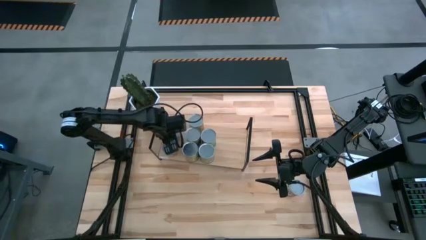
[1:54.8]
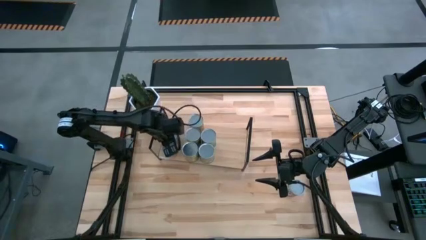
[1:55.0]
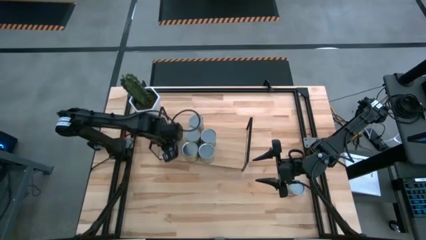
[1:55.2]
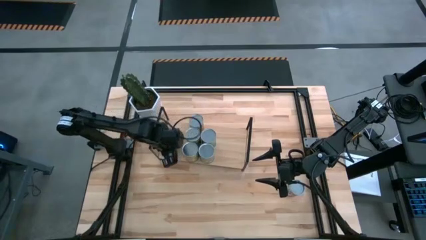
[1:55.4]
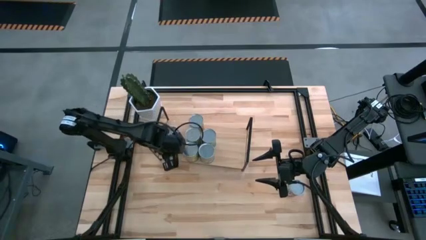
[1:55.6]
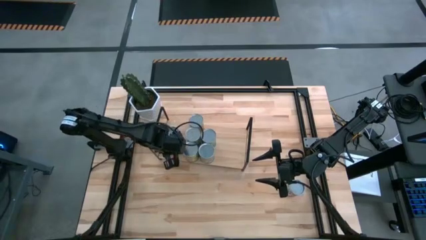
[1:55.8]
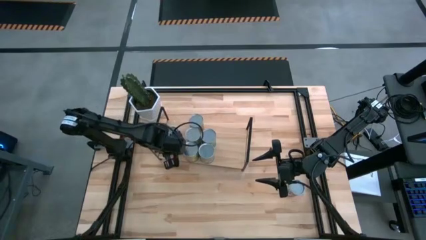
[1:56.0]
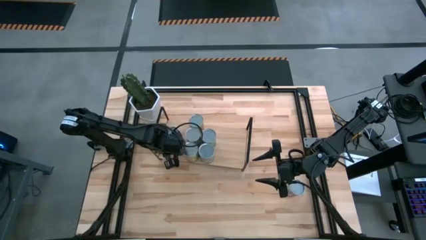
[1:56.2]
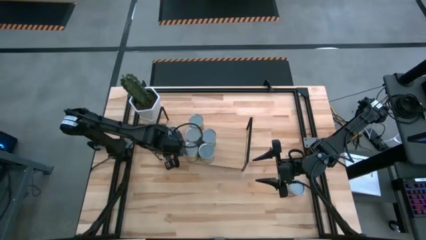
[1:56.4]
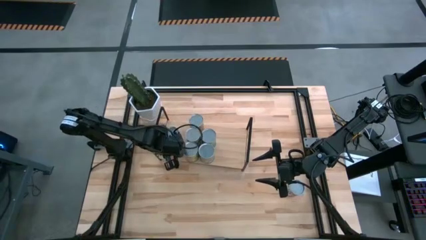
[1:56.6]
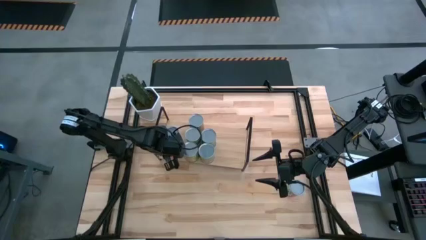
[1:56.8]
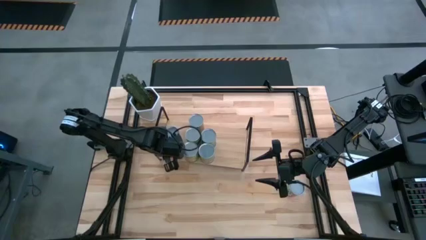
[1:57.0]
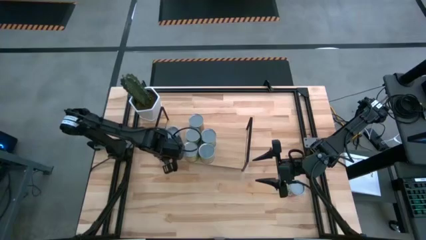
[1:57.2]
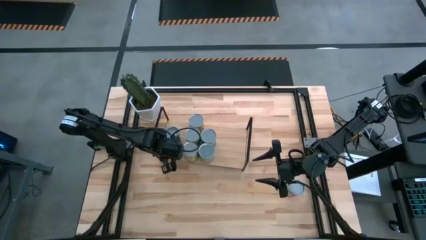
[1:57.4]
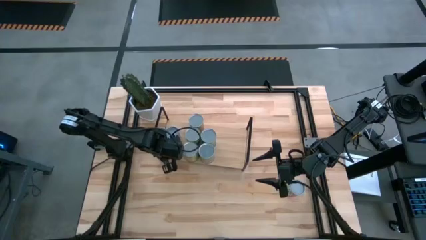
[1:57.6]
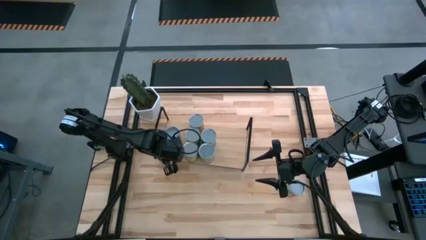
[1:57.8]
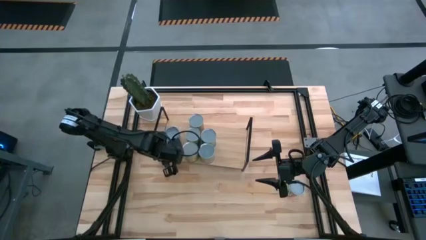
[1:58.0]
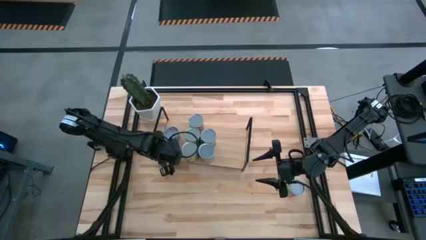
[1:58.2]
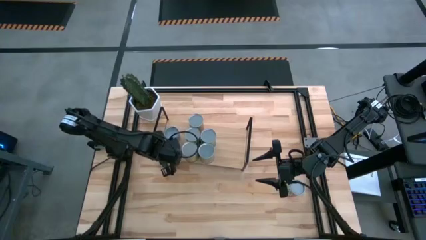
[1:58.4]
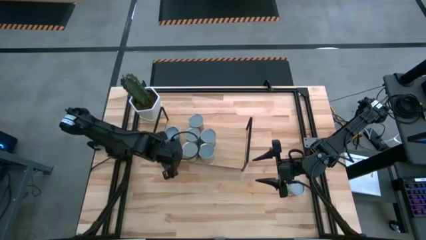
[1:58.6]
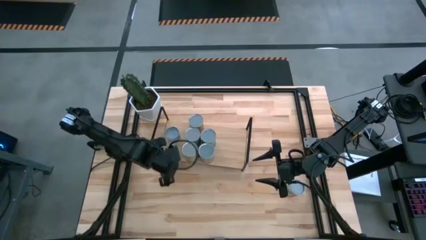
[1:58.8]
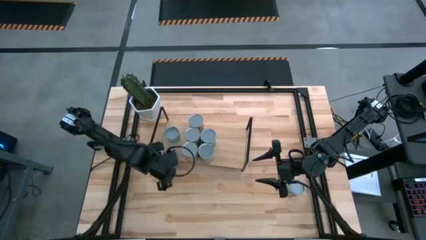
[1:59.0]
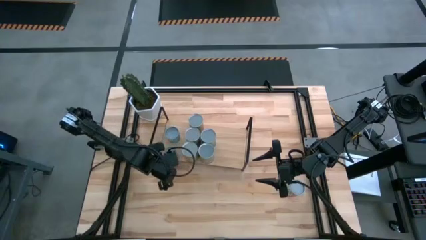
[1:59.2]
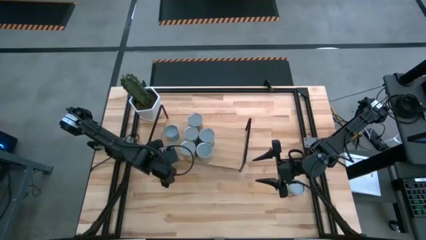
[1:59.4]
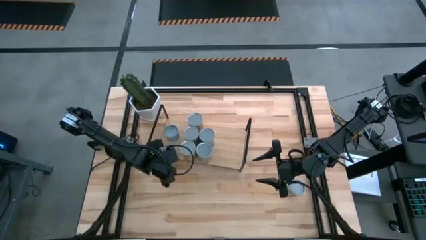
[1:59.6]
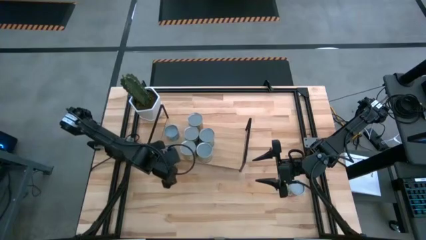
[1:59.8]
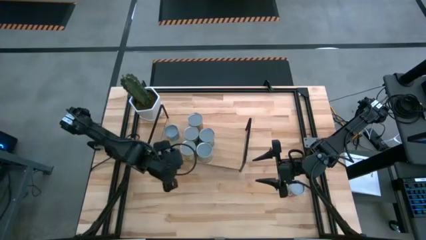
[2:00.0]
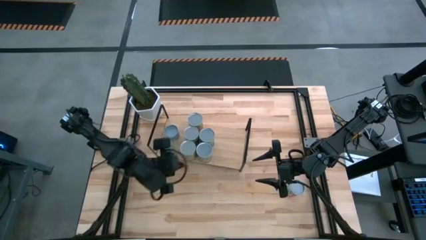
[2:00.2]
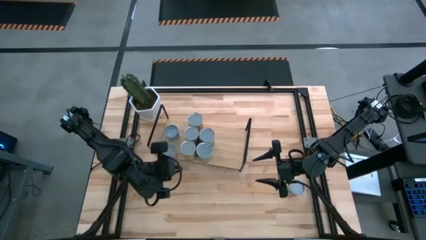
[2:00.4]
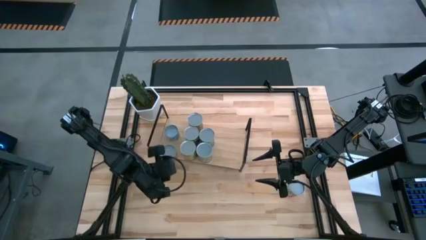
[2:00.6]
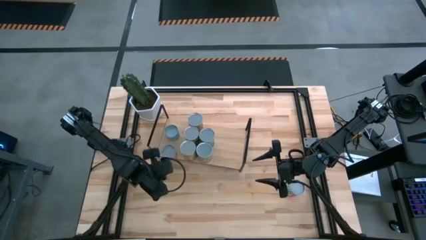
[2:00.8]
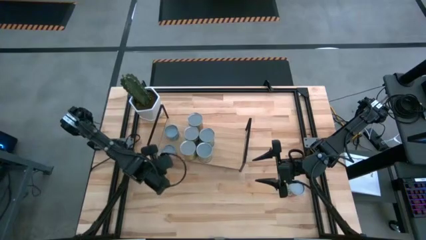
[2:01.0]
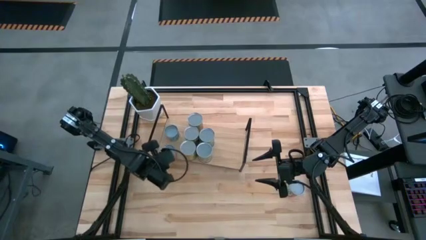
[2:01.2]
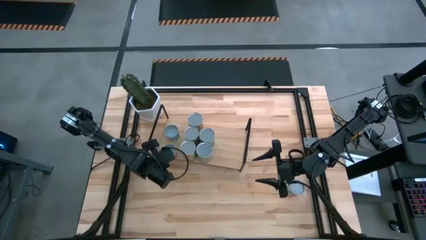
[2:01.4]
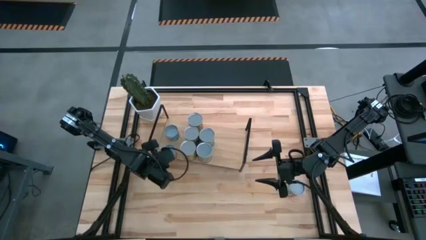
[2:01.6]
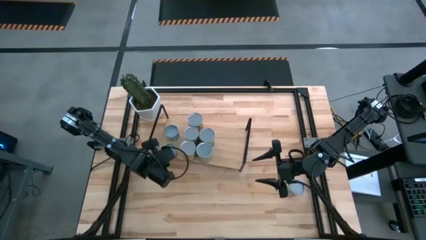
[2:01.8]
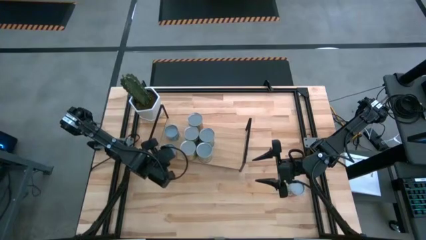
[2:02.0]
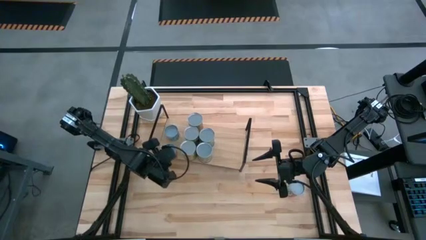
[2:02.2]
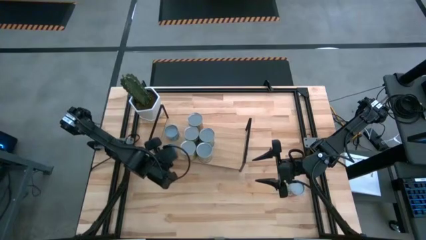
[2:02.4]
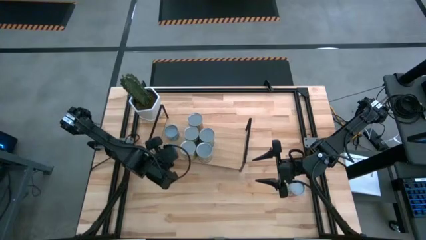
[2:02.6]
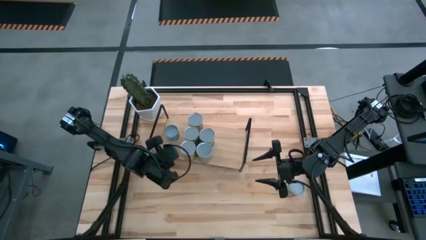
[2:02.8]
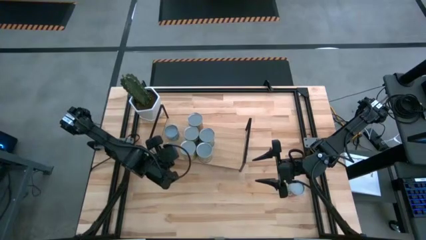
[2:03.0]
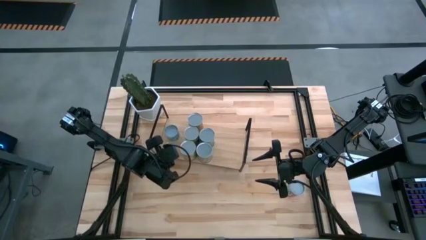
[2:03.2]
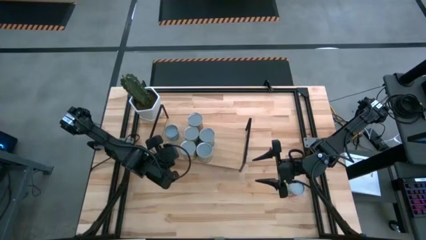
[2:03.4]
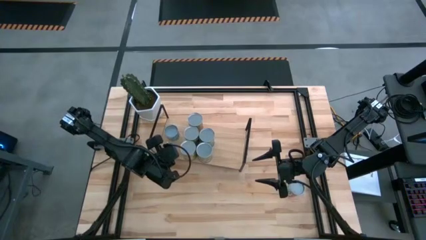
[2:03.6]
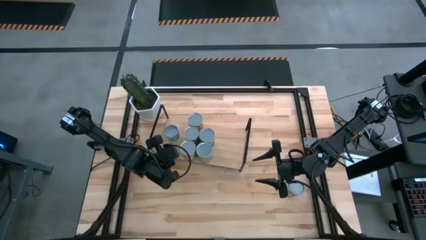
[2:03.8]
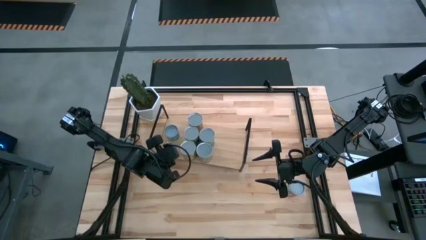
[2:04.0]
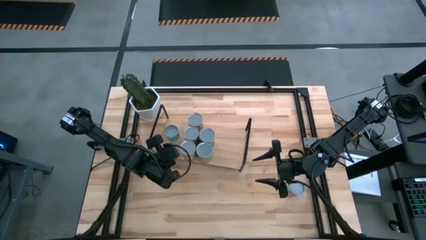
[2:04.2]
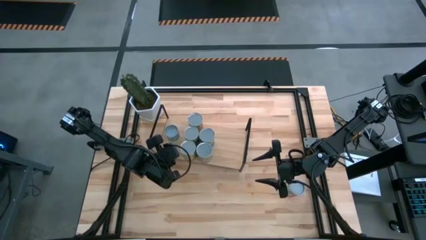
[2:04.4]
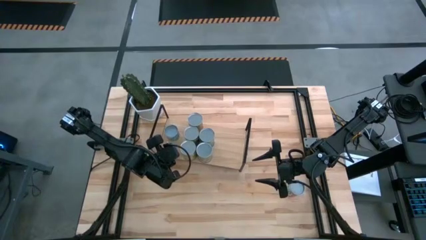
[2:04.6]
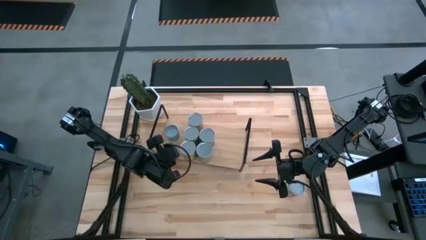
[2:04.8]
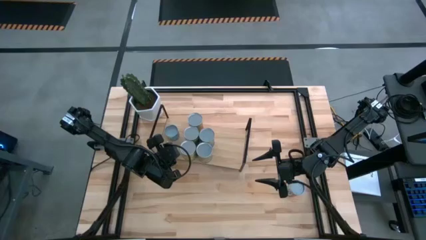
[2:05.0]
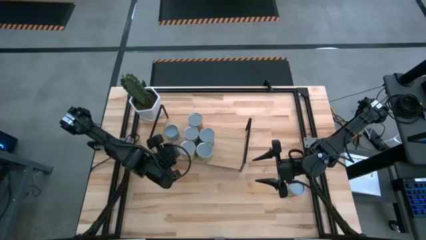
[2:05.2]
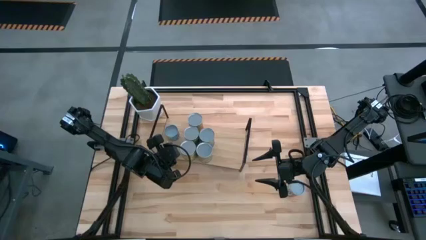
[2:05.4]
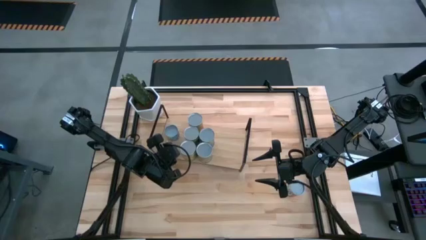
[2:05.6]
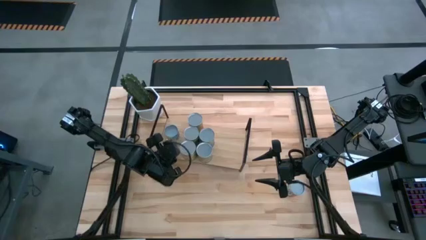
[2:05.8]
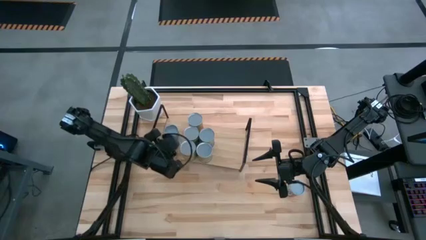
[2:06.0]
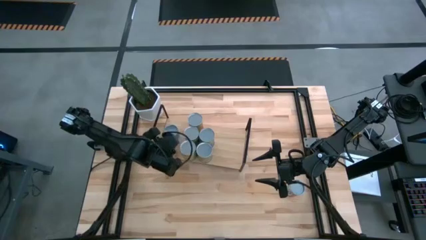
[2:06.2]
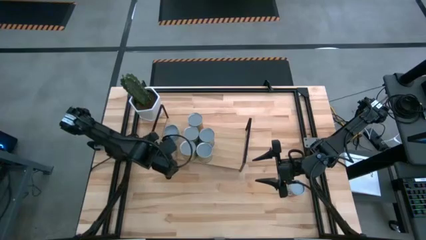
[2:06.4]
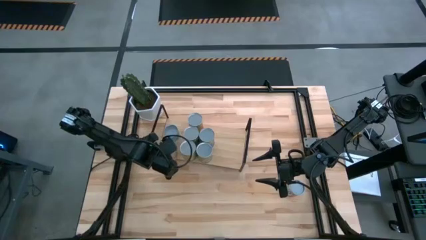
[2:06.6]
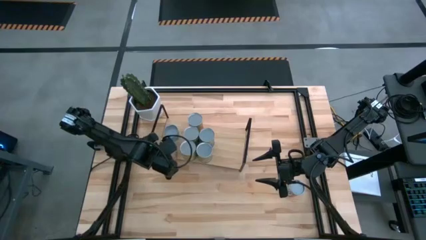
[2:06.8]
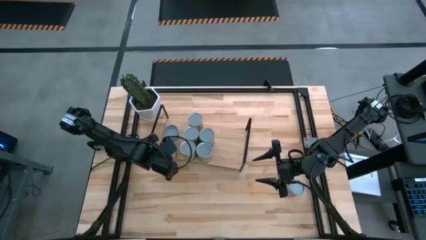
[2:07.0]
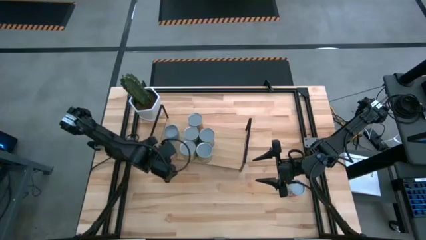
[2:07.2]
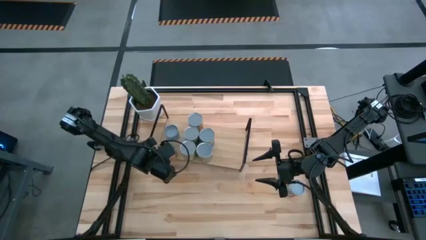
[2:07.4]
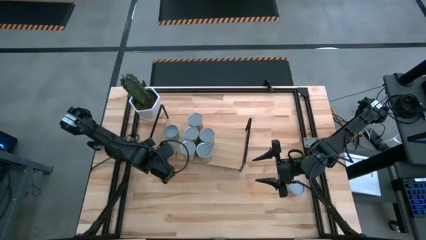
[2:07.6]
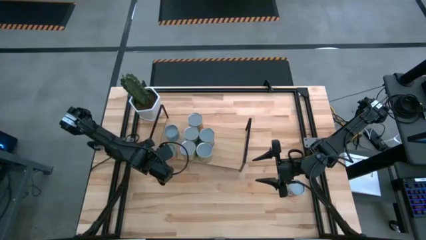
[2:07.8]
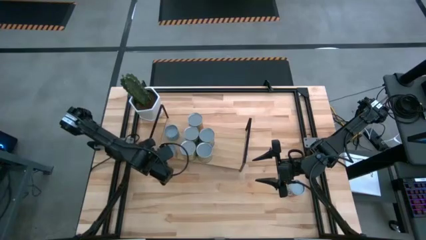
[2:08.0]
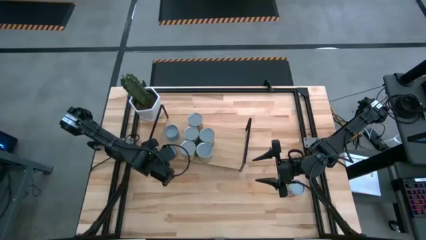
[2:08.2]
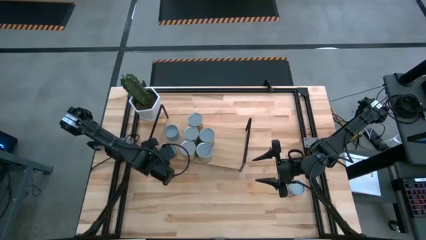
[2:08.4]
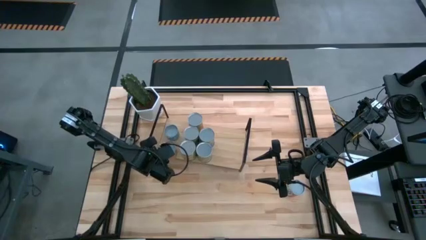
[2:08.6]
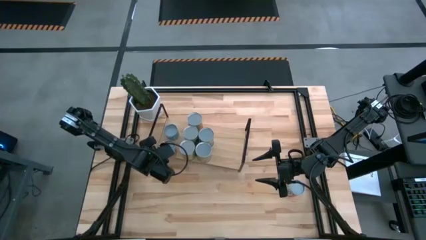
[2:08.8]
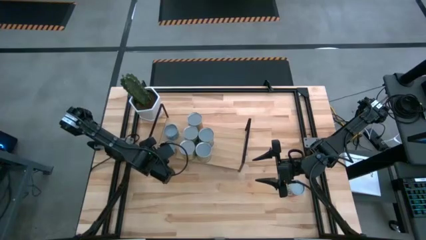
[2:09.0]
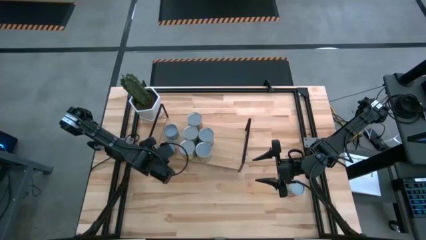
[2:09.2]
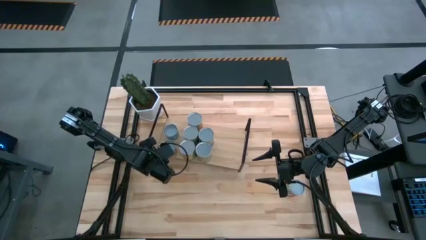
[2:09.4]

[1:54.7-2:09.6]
Task: Pick and place cans onto a shelf
Adjust the small canned oranges can on the shelf

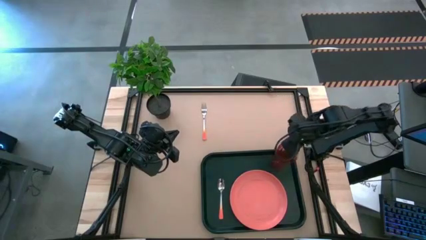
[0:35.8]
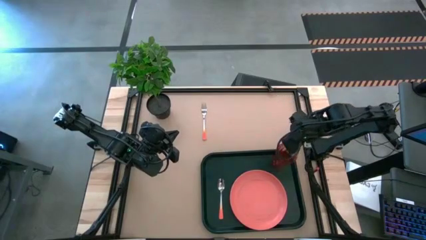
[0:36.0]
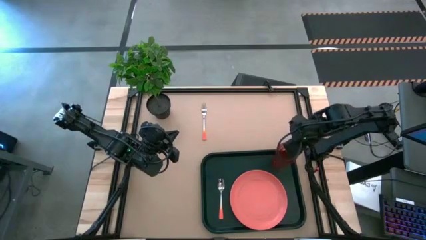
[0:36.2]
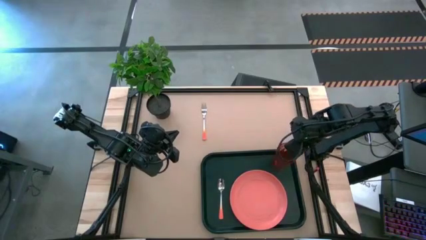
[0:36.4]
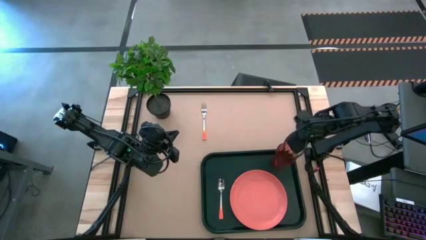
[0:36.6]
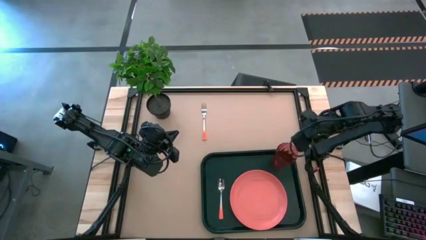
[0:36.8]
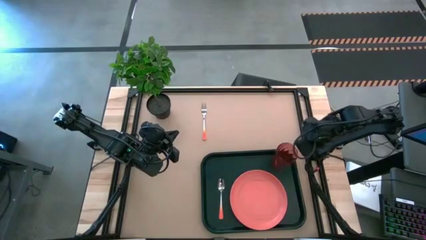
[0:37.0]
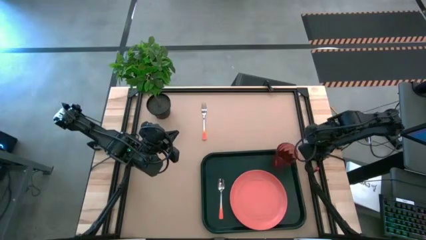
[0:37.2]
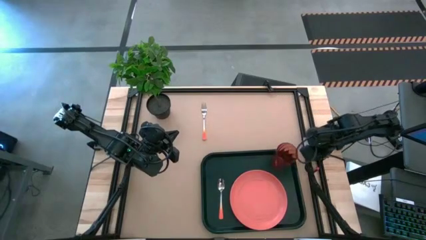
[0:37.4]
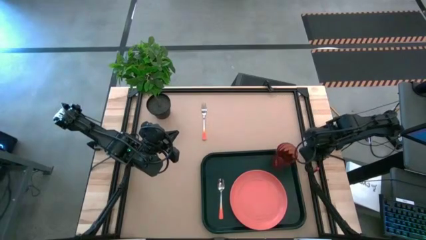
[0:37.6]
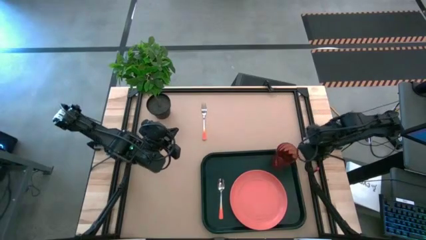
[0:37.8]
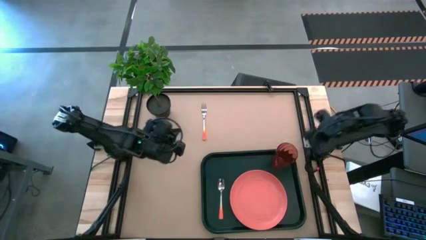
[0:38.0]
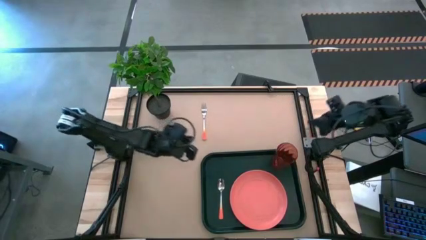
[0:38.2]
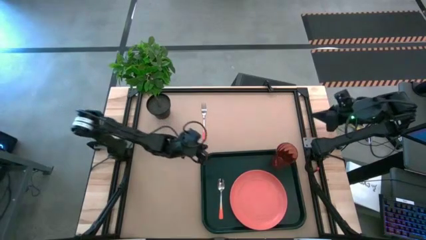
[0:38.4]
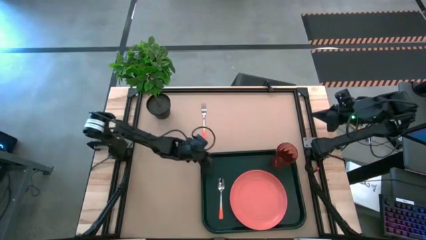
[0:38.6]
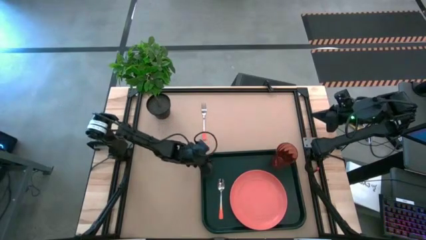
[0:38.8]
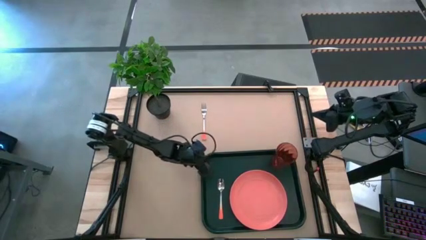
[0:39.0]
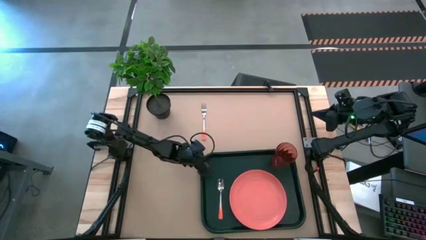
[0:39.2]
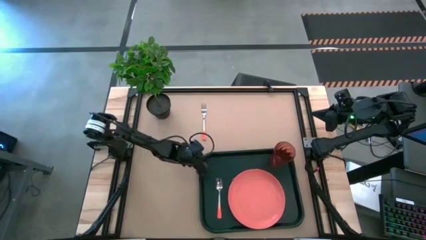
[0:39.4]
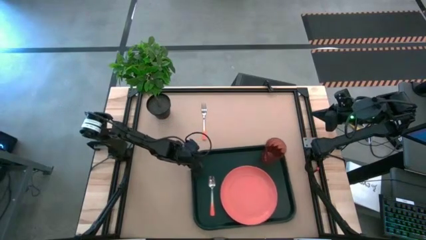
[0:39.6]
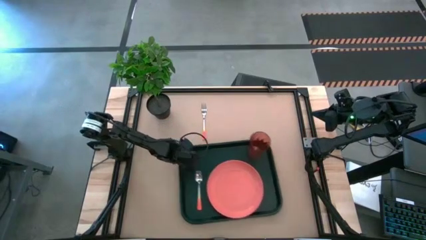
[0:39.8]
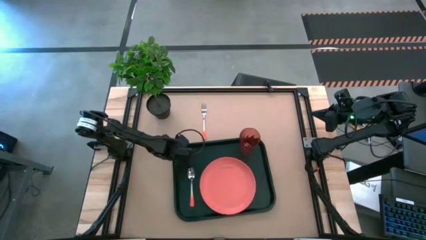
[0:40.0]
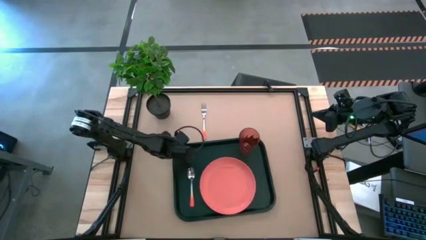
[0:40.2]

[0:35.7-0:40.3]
Task: Pick and place plate/cup/fork/spoon on tray
Move the black tray to the center of the table
